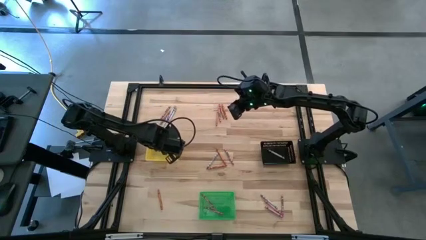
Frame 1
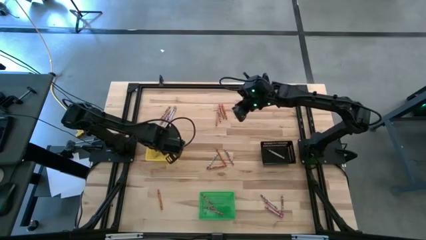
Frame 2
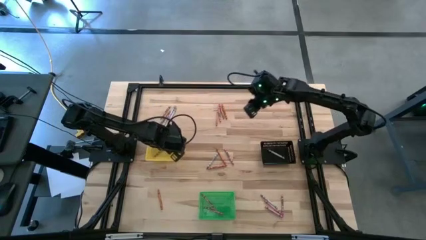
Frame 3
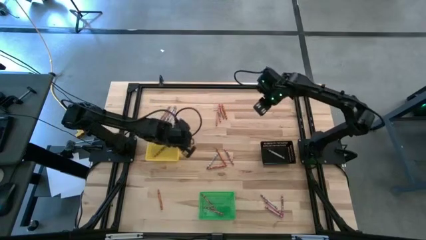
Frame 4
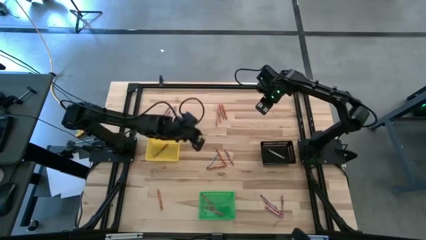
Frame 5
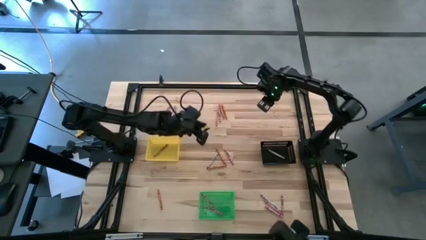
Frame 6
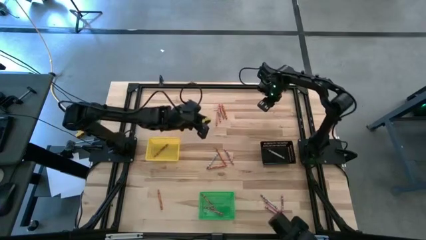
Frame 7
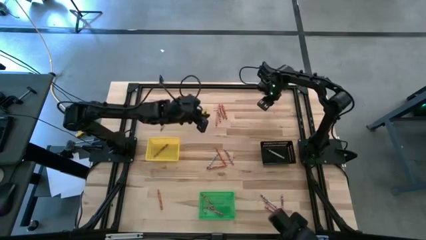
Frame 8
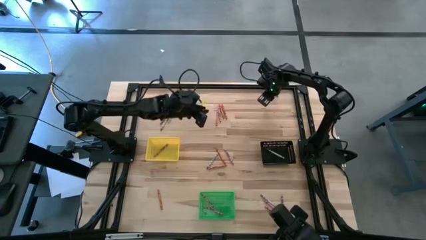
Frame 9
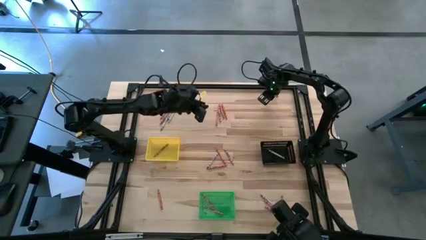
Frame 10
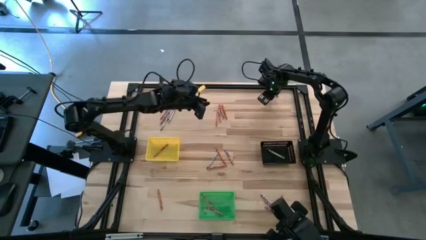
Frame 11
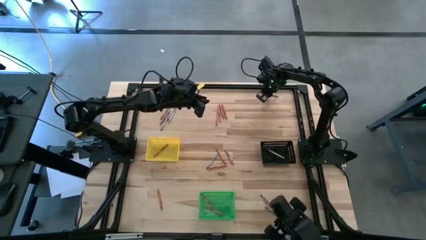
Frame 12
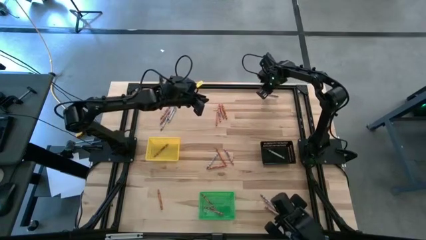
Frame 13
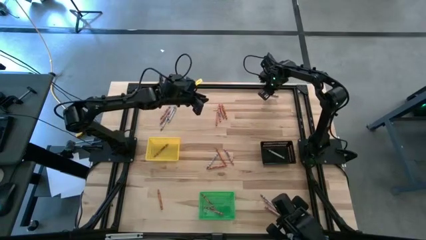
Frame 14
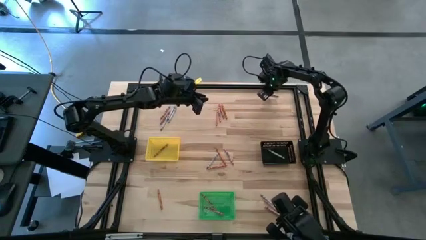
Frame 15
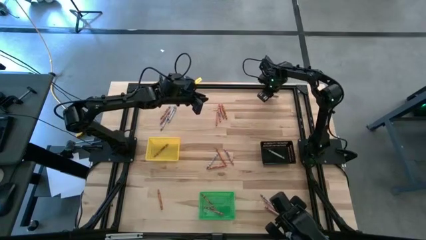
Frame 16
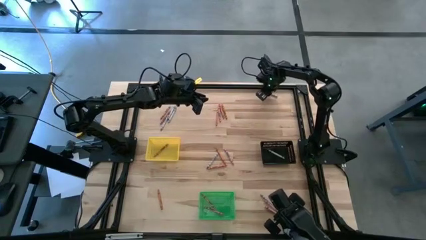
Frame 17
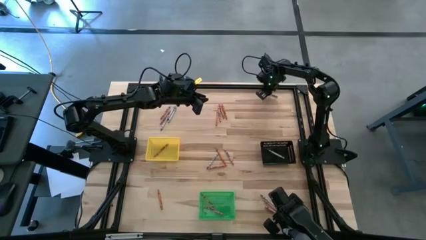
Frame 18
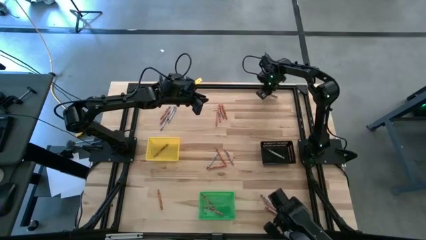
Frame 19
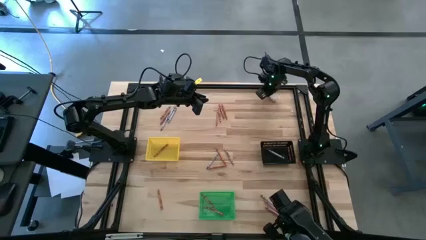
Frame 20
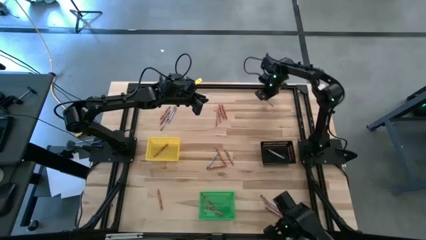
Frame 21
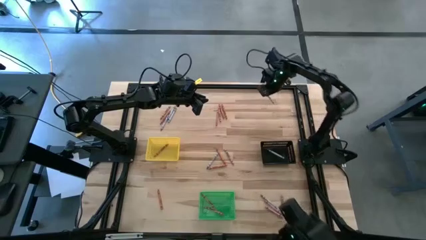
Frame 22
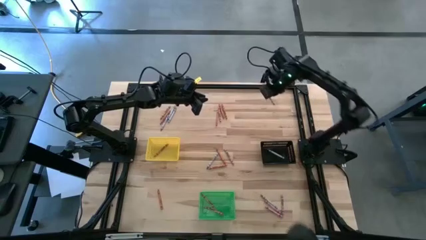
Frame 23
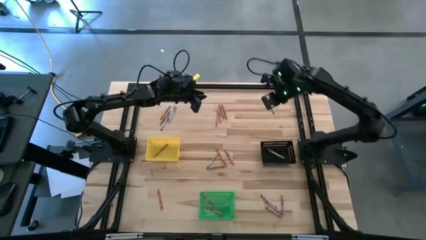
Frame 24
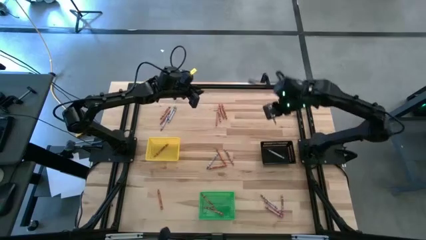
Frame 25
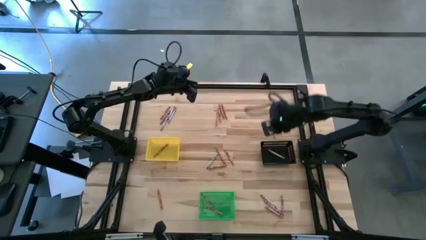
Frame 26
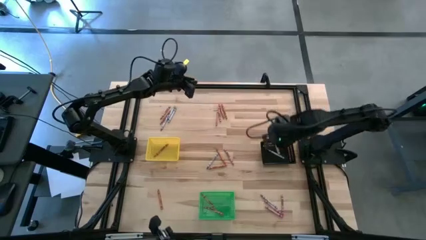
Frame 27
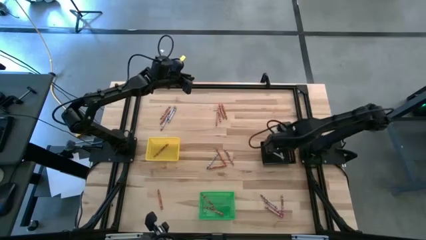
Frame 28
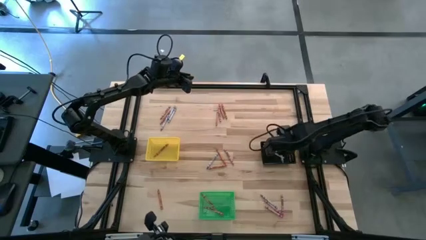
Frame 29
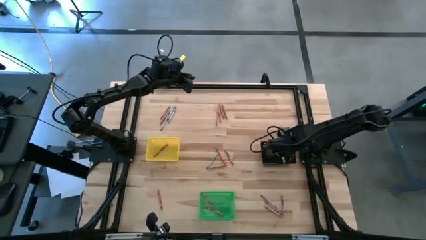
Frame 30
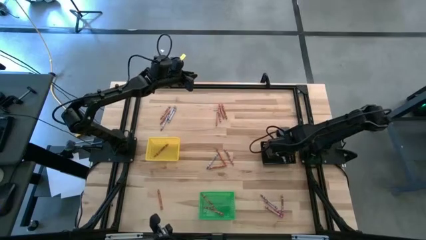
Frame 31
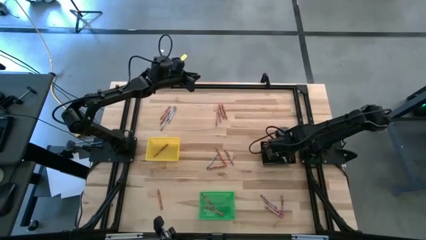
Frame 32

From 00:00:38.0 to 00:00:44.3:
Task: Sort crayons
Put the gray crayon into the black bin

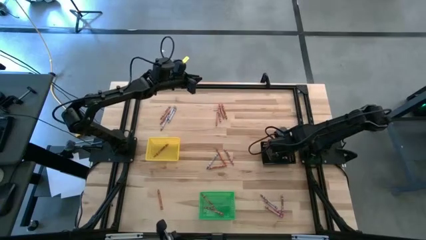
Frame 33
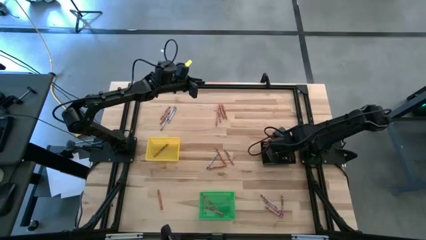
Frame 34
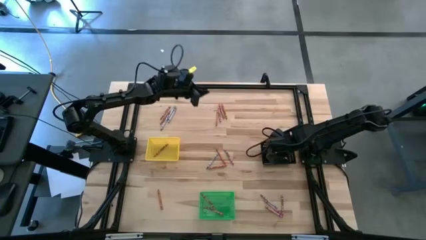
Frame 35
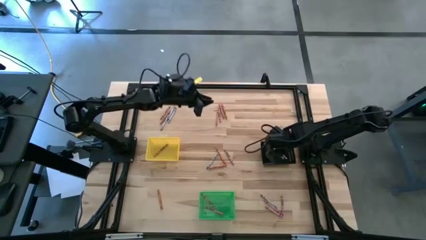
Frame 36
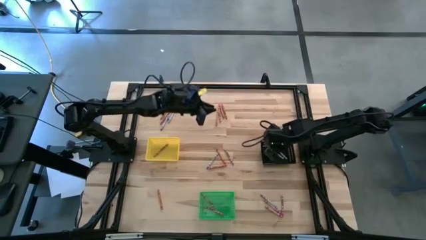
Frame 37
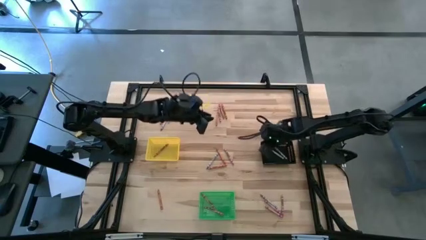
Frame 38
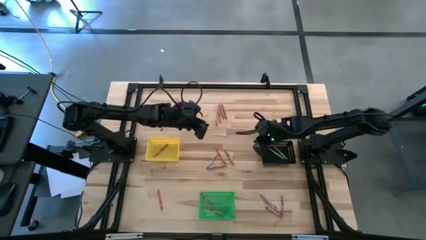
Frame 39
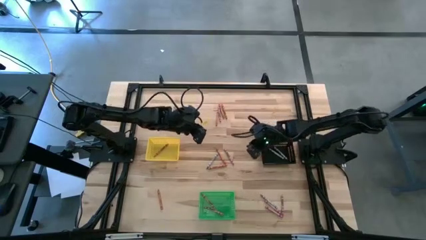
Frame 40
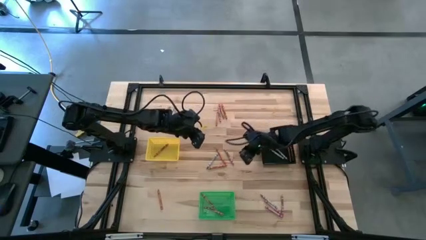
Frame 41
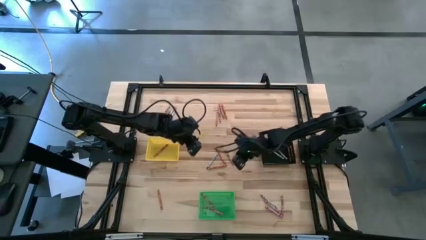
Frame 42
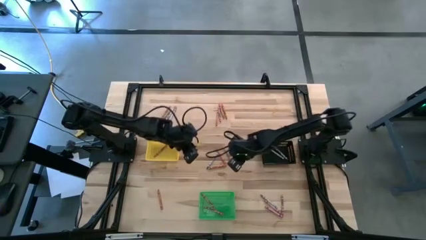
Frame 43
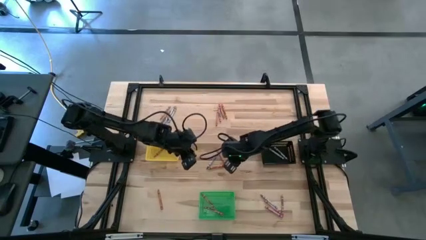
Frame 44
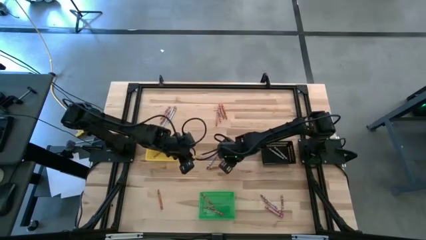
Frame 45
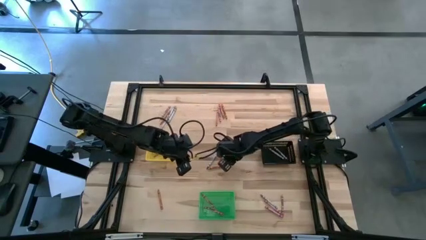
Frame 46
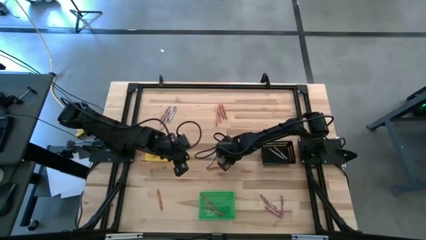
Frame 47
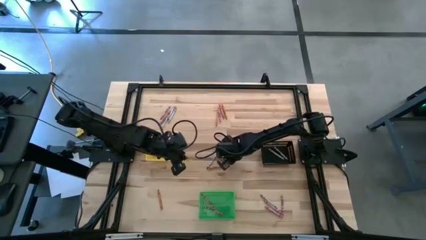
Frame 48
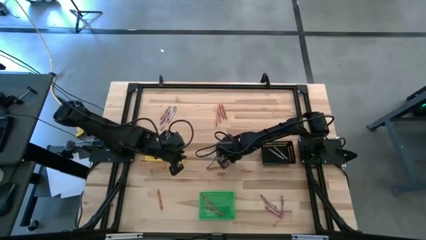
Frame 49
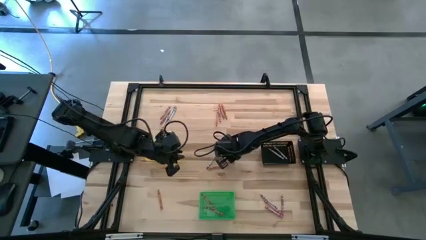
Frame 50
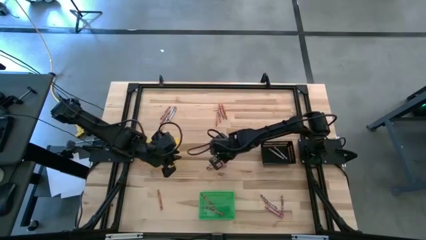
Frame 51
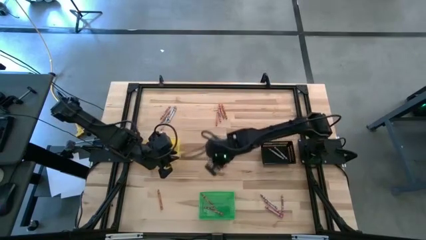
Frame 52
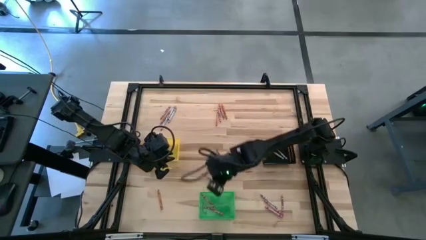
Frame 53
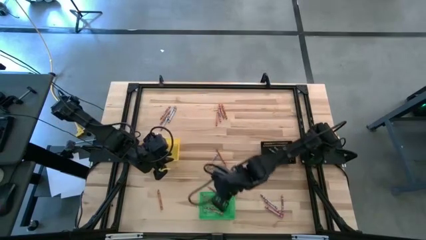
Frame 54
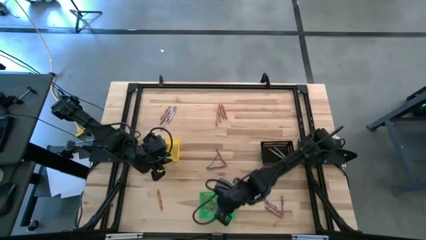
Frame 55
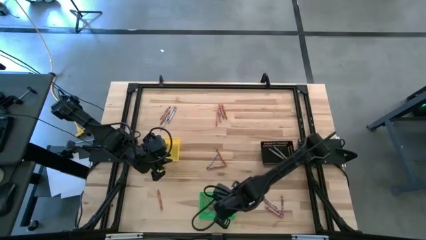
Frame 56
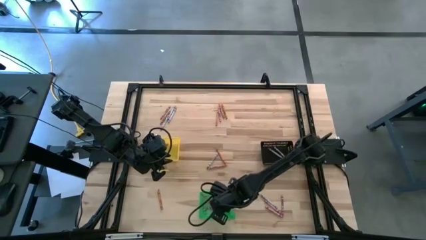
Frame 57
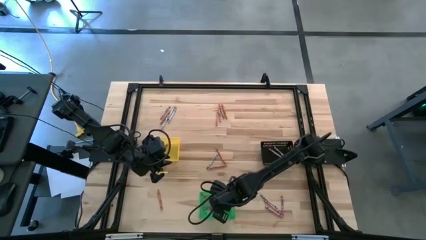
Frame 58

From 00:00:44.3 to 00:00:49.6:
Put the pink crayon into the green bin

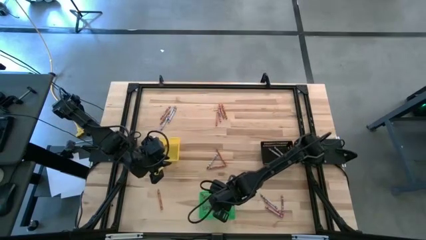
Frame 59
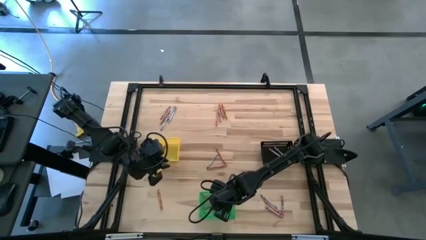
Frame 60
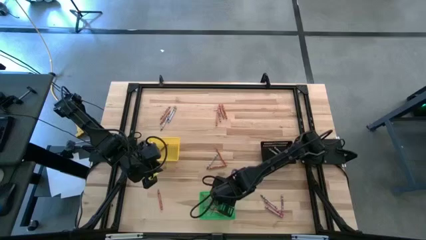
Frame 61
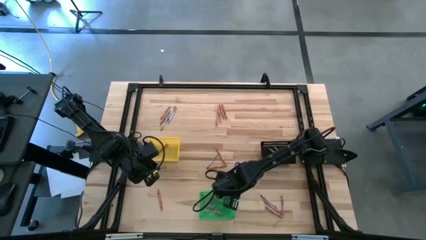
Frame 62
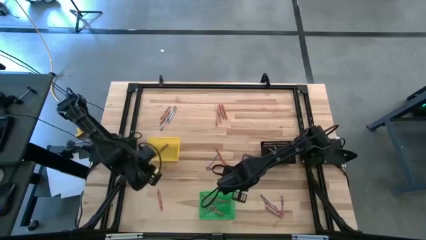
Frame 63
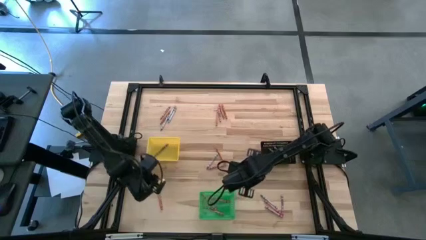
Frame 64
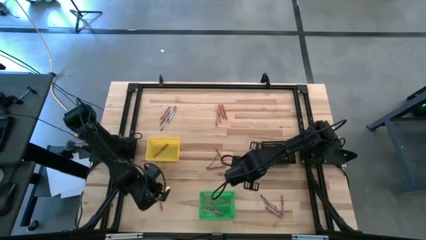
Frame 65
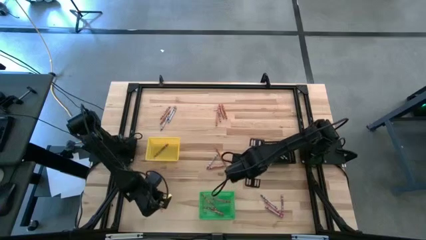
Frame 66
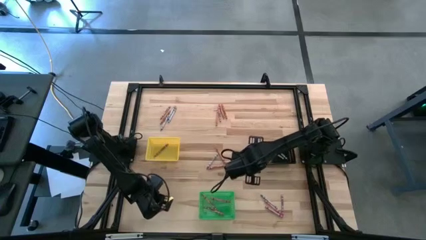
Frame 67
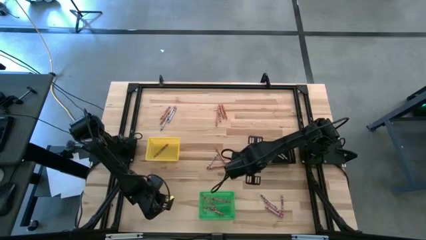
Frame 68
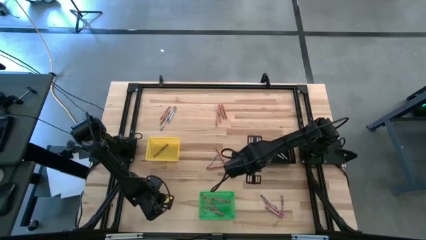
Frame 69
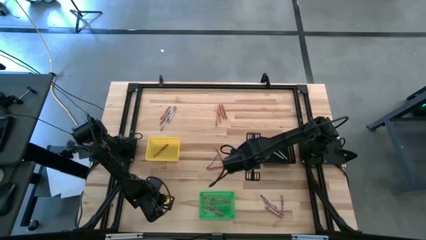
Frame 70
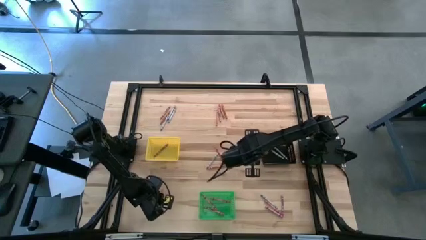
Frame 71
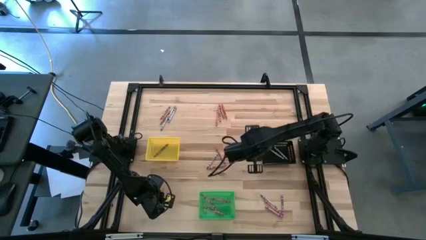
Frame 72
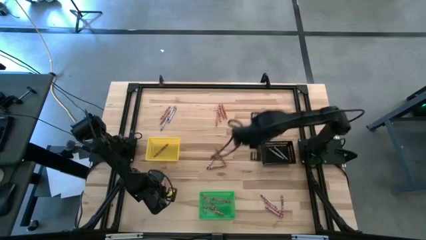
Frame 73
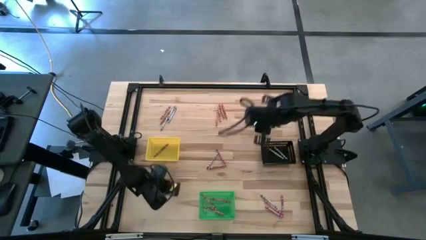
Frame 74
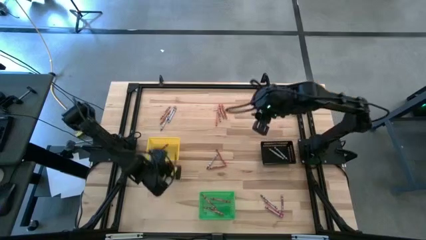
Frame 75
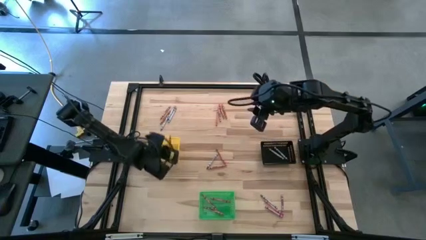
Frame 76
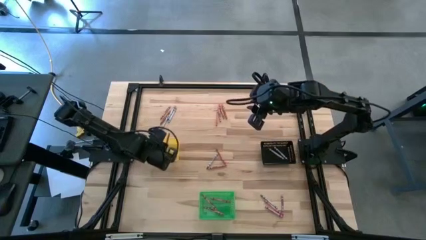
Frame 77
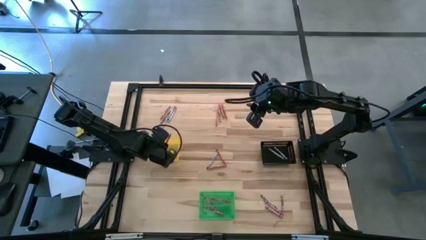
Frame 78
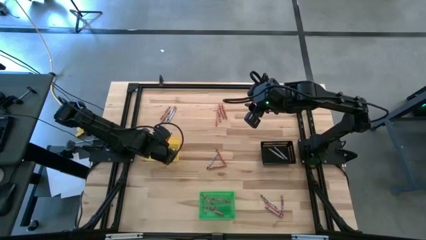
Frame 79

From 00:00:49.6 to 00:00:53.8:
Put the orange crayon into the yellow bin

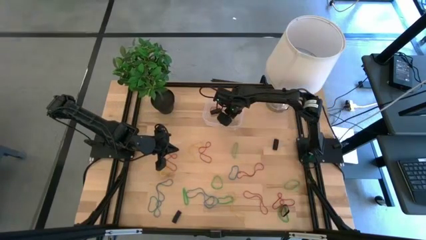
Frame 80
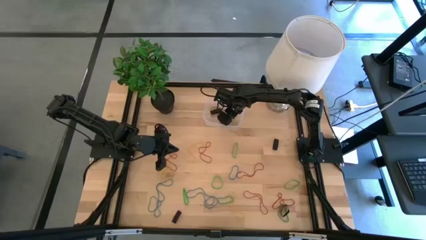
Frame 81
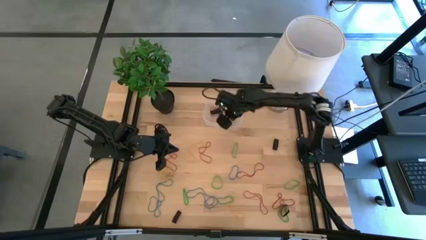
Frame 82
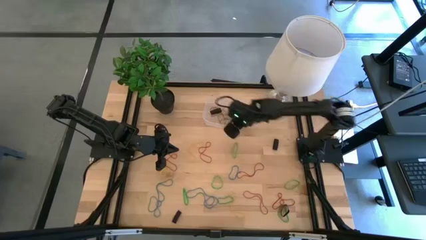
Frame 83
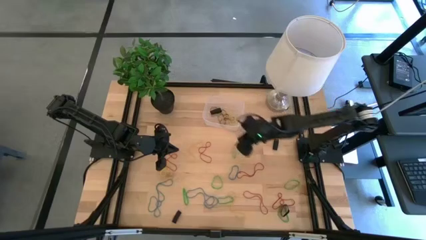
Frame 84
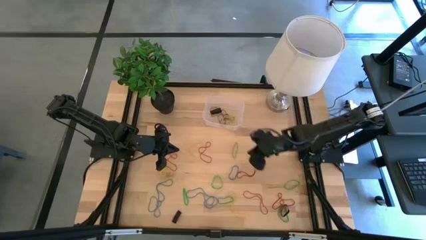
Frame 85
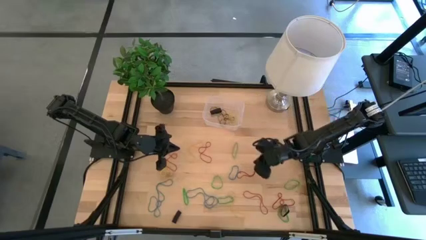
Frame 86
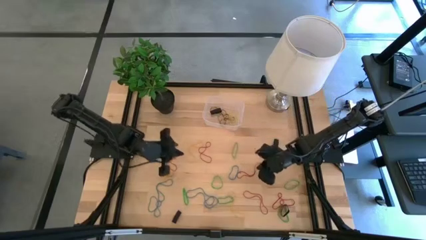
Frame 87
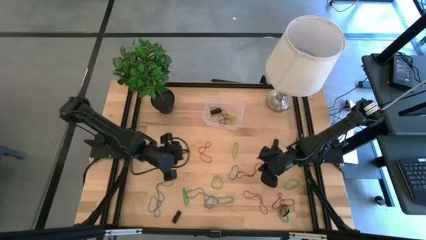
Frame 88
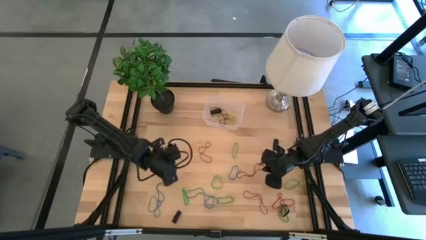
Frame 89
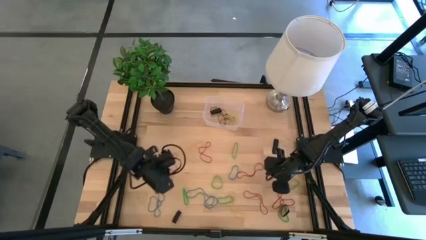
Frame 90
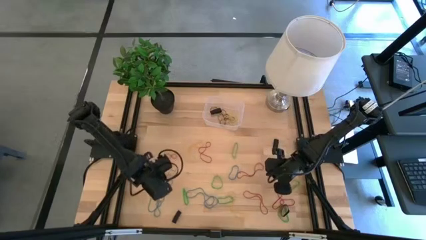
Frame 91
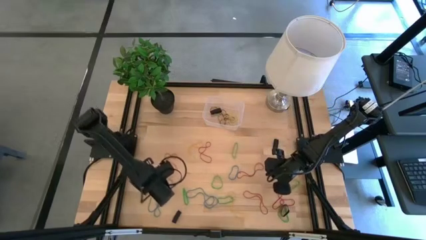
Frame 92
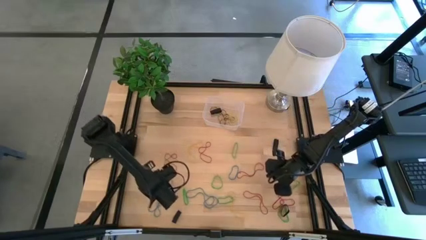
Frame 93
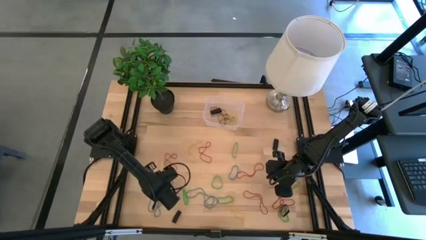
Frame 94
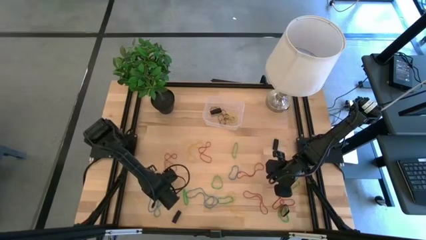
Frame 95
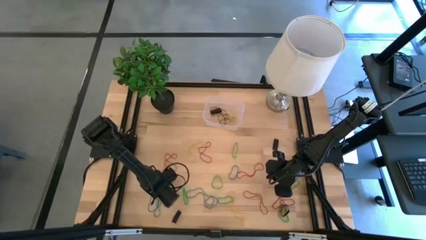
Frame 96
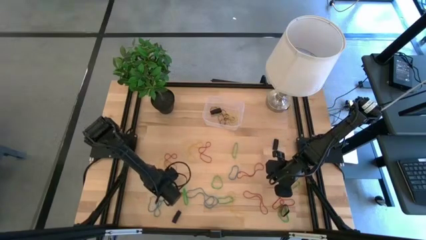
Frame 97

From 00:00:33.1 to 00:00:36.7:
Task: Pick and place rubber bands into bin
Put the blue rubber band into the transparent bin
